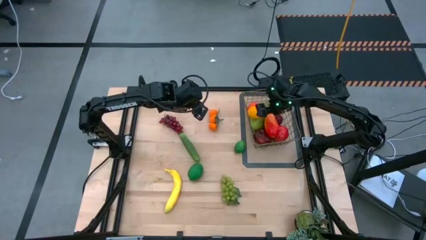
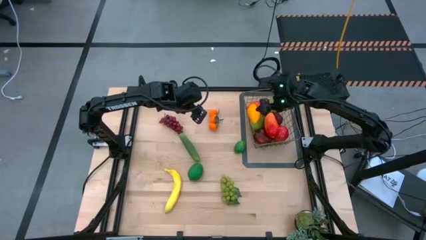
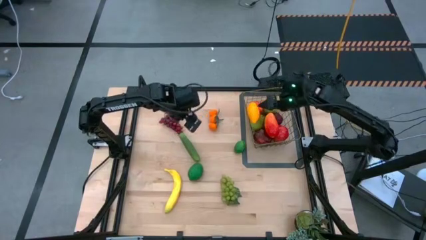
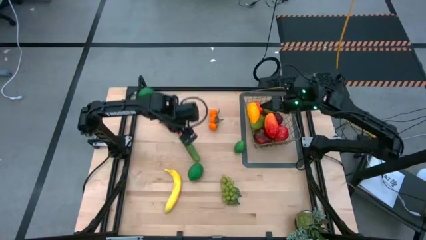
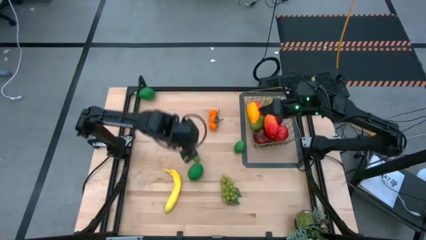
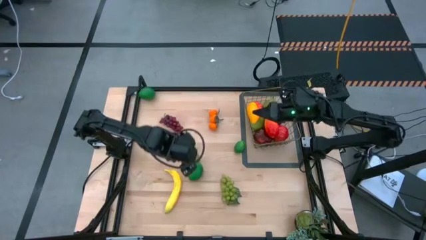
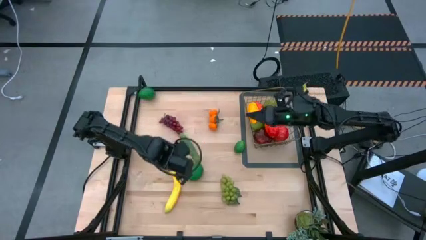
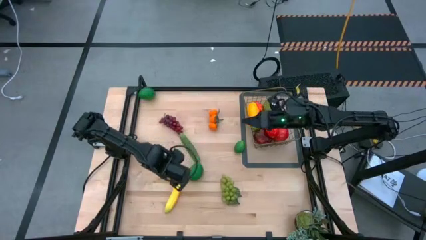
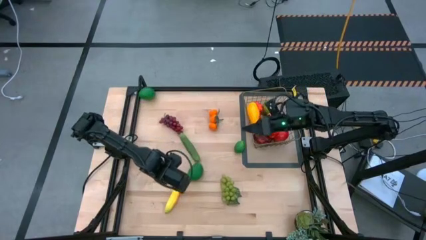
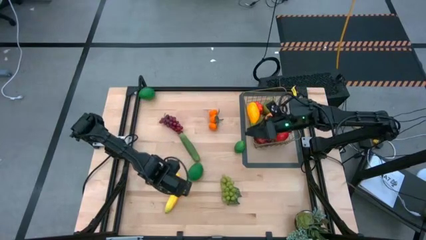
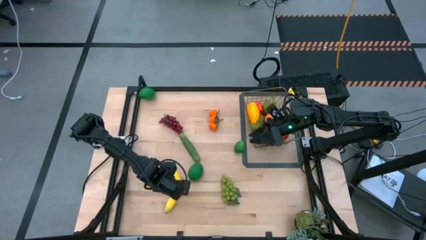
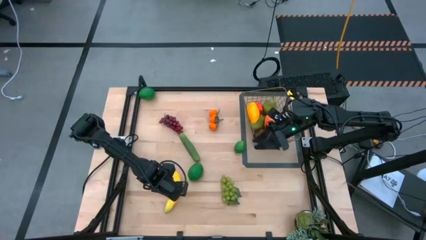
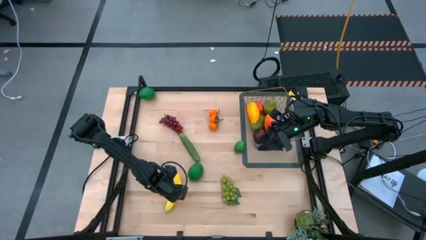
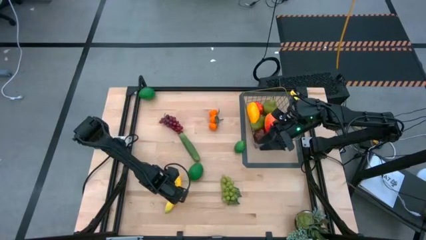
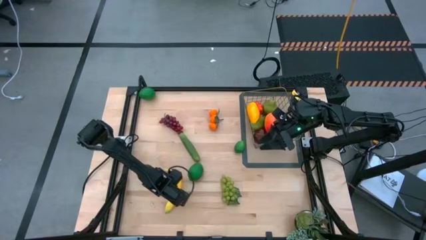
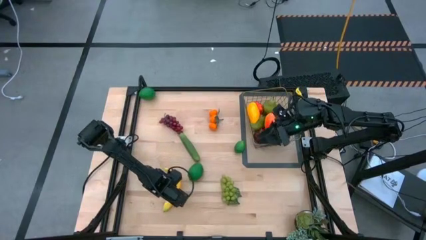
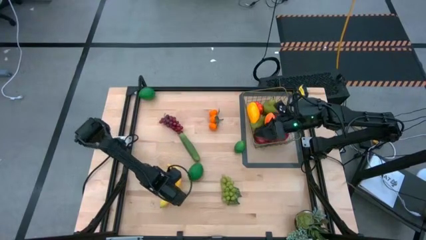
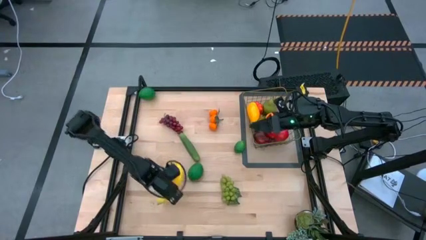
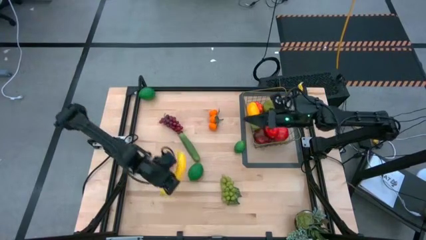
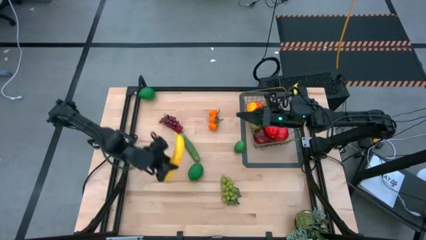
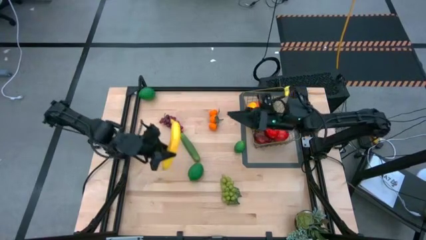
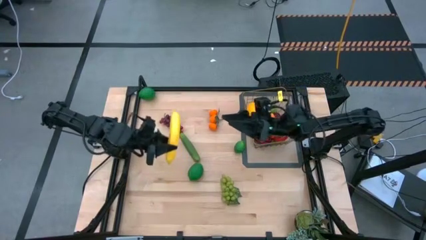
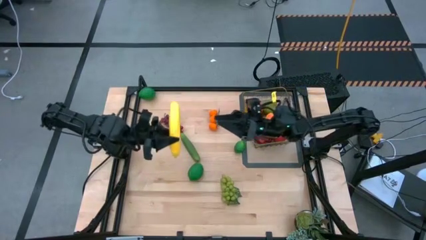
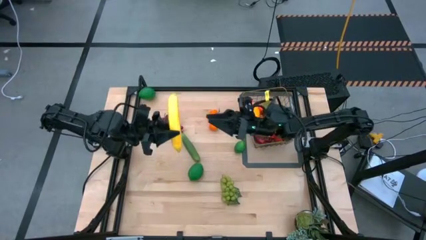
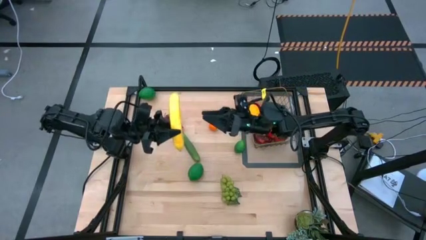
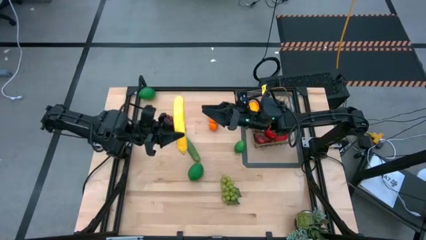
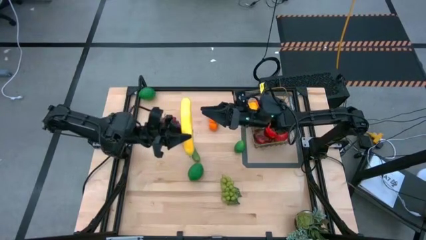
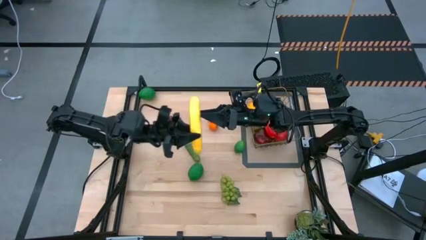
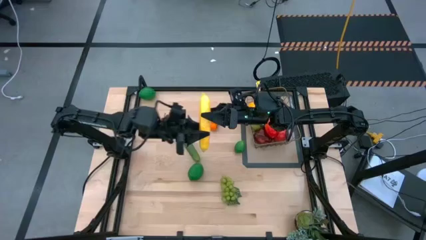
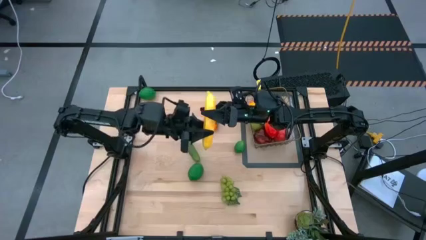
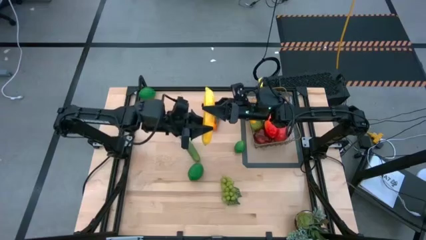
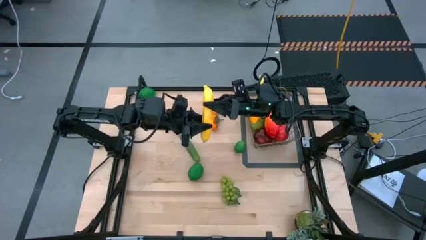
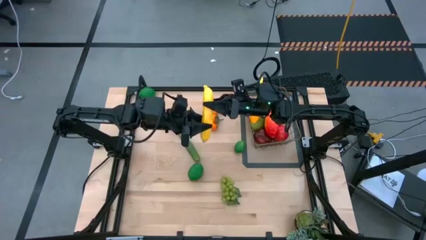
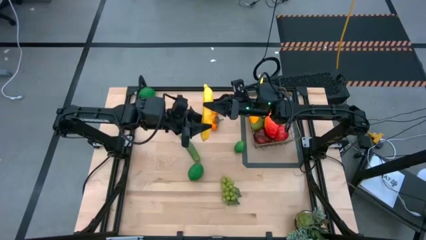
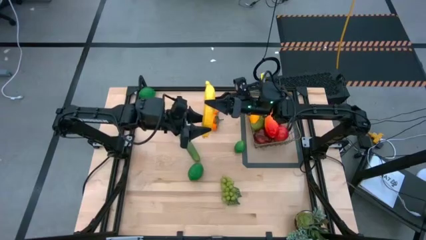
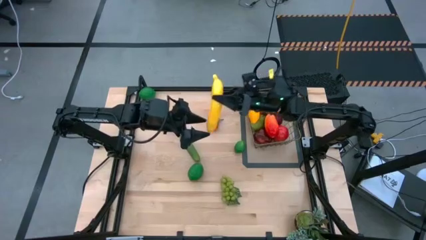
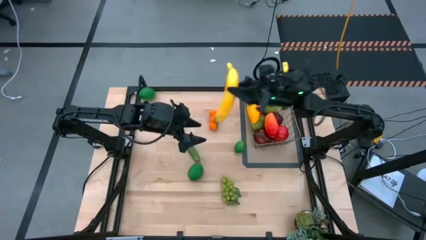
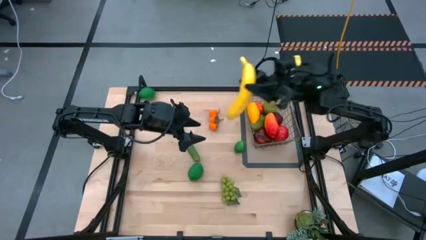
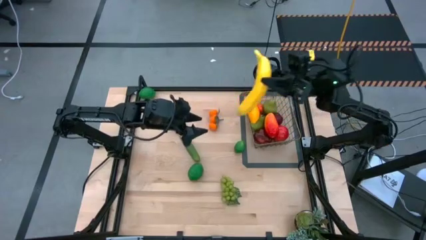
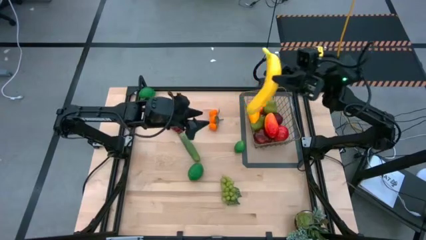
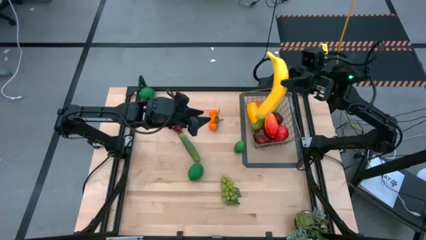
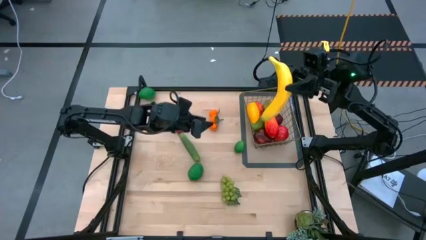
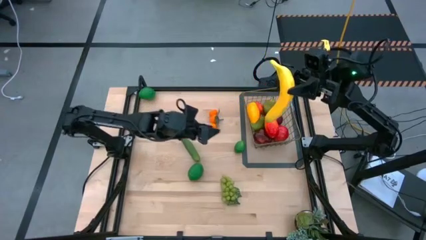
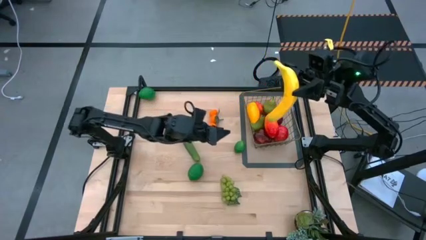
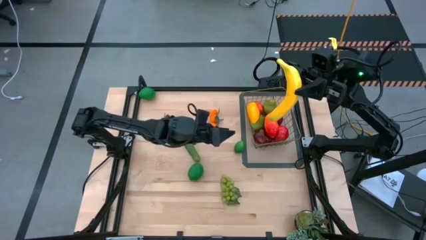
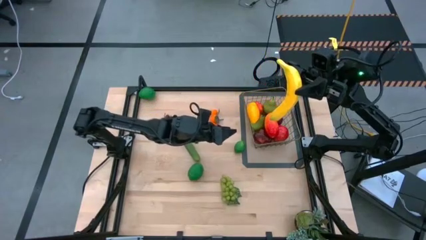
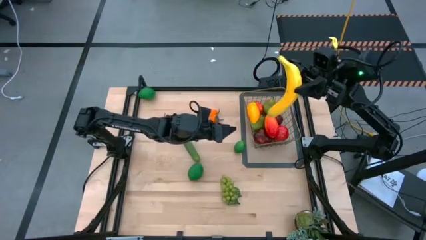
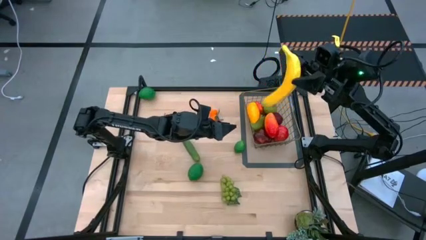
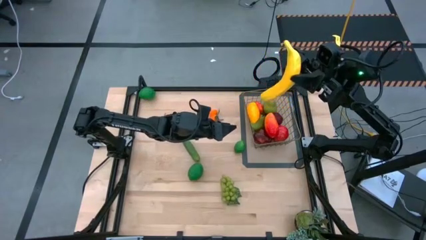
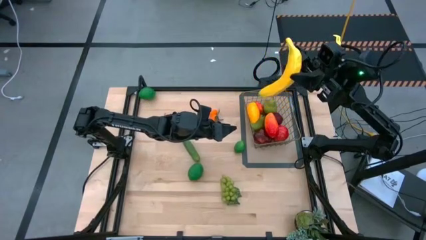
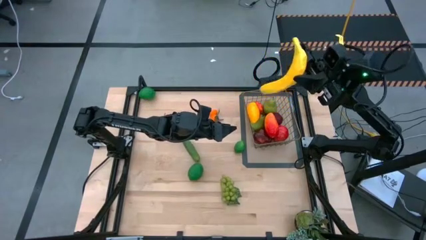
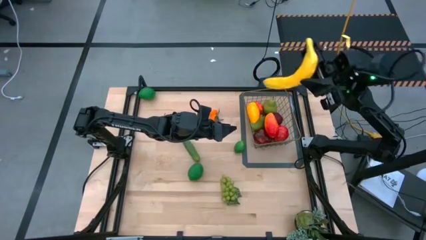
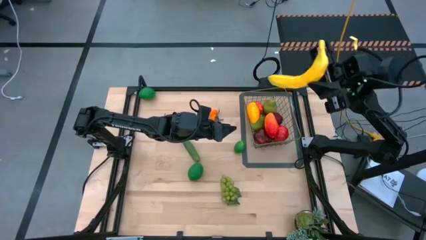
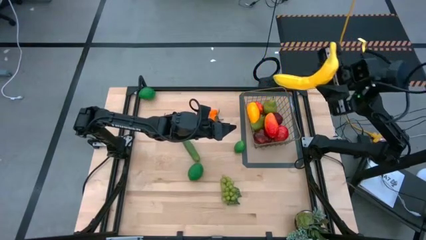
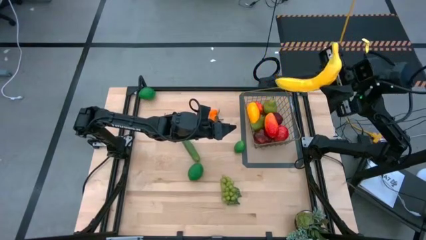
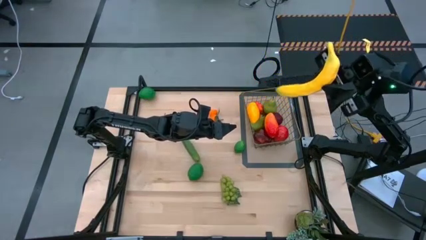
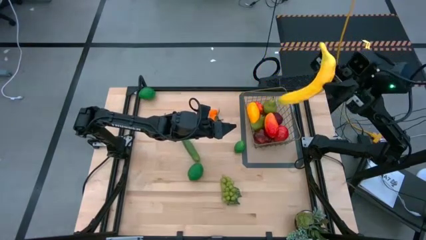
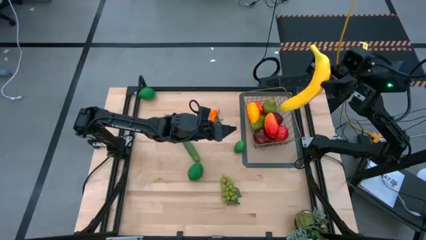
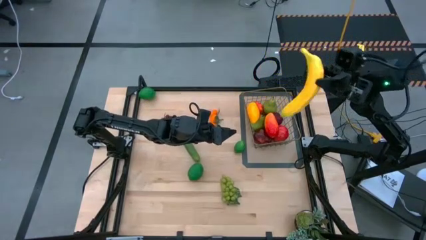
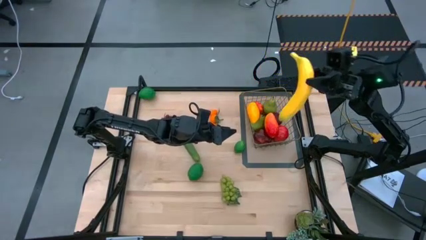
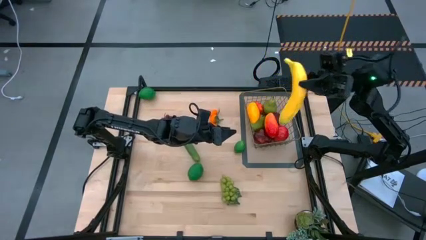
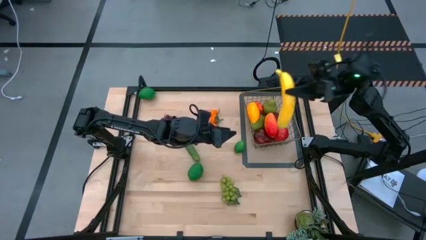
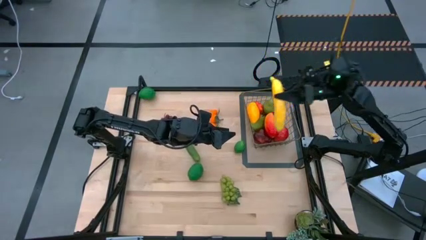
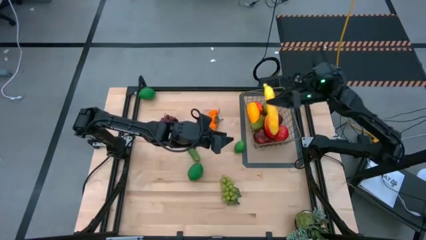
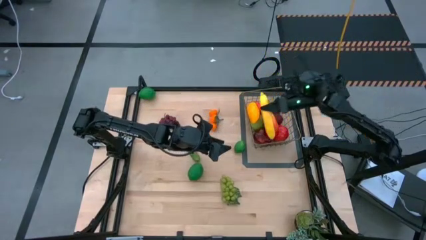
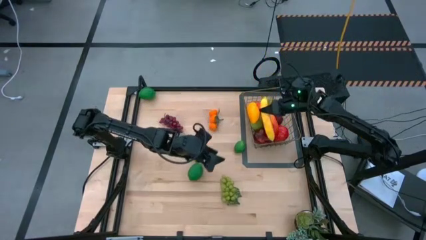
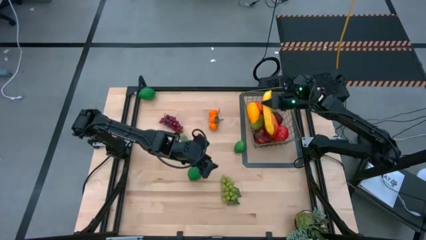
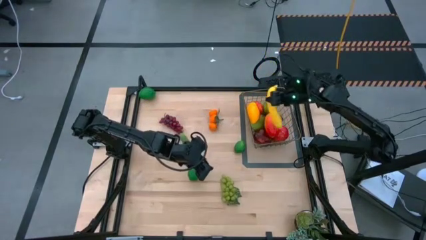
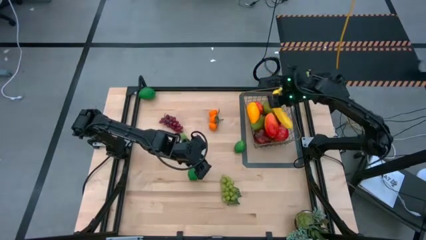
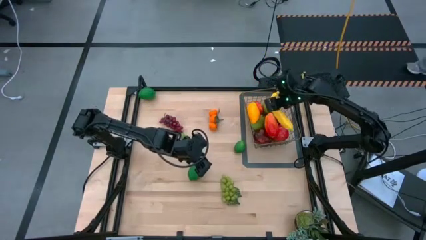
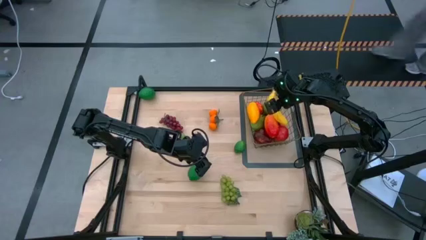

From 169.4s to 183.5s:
Task: Build produce basket
Put the yellow banana into the wire basket

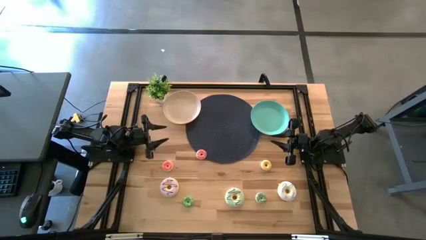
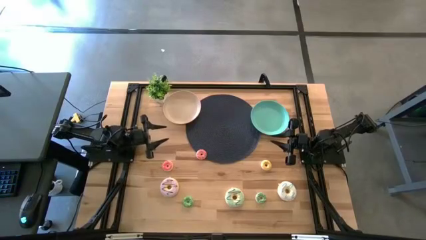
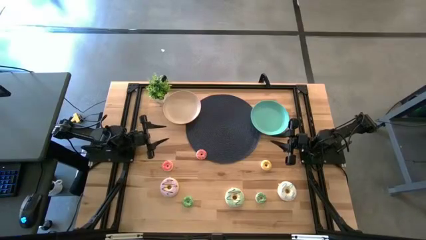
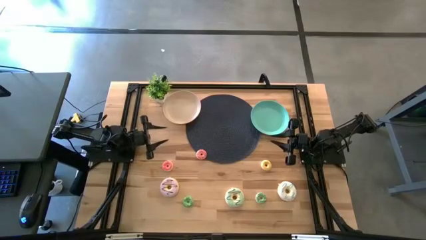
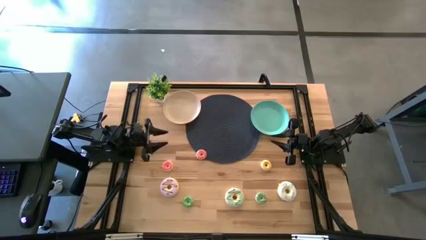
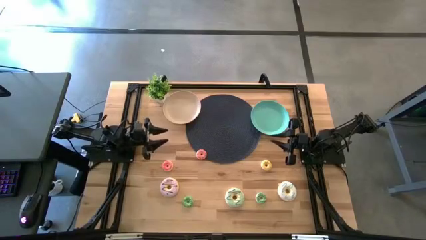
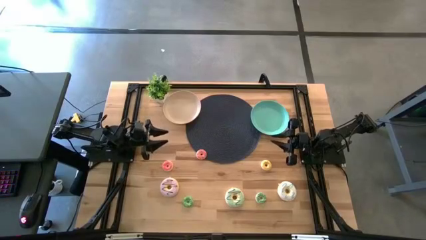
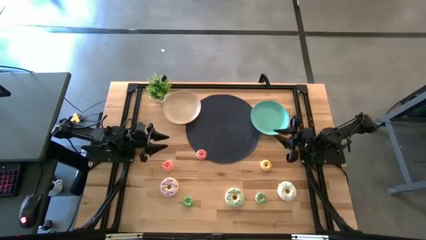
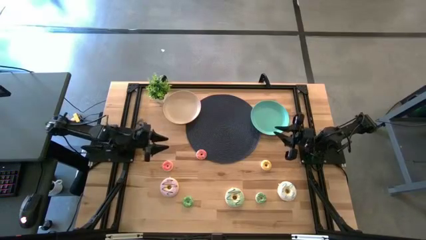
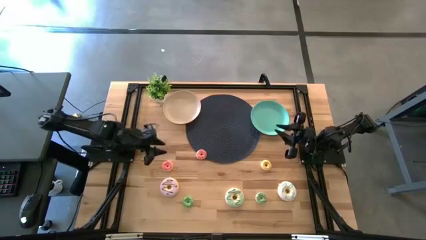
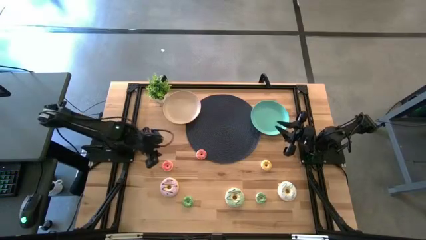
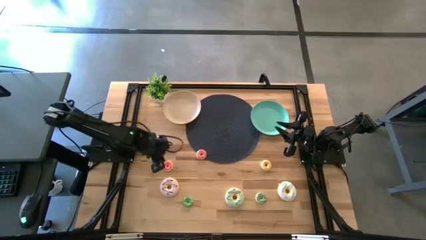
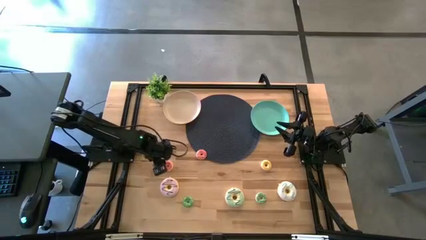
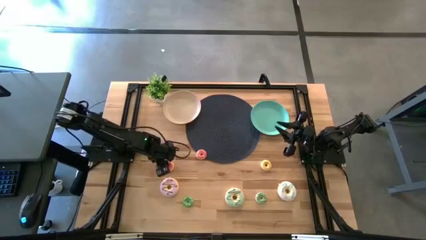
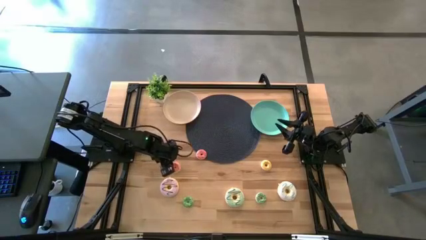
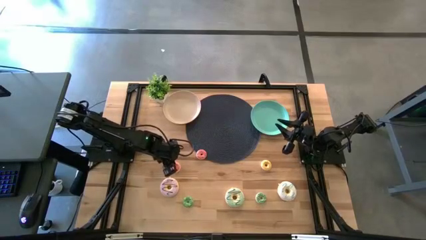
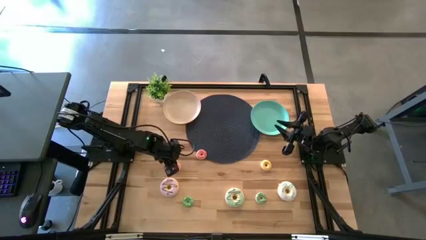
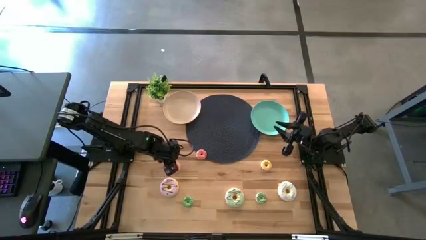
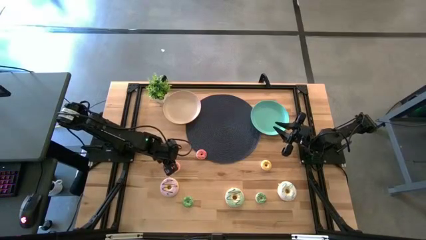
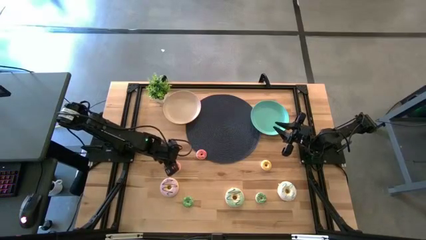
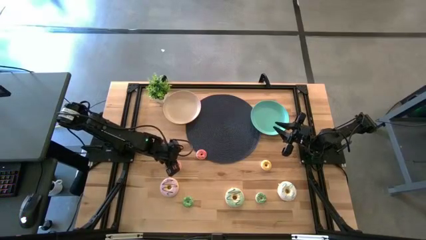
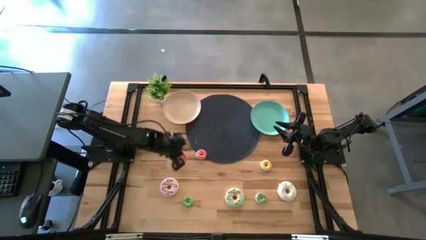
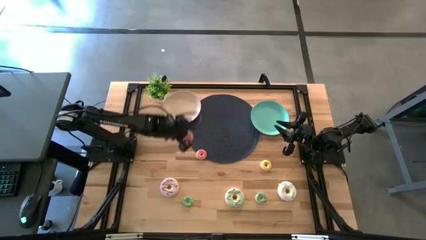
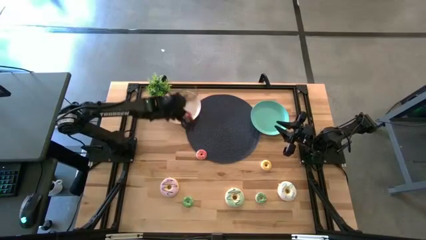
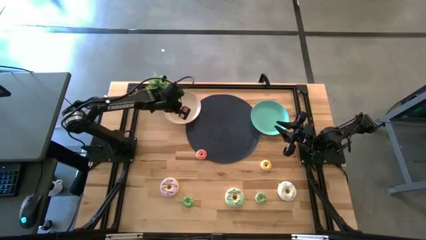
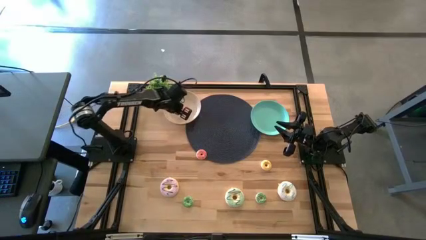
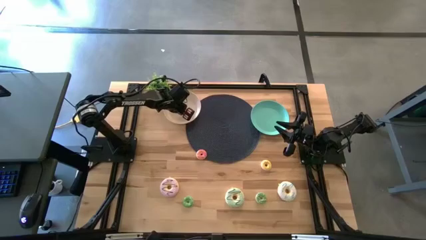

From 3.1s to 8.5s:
Task: Pick & Place donuts
Put the left small pink donut on the white plate
